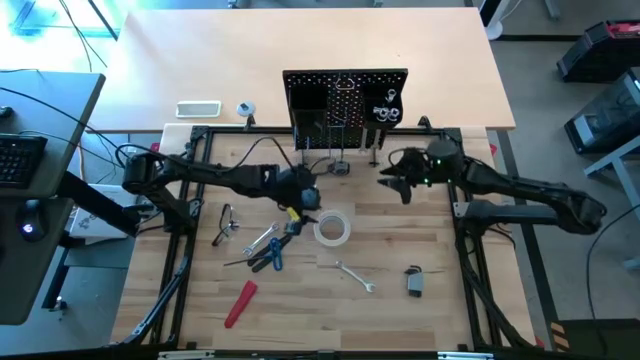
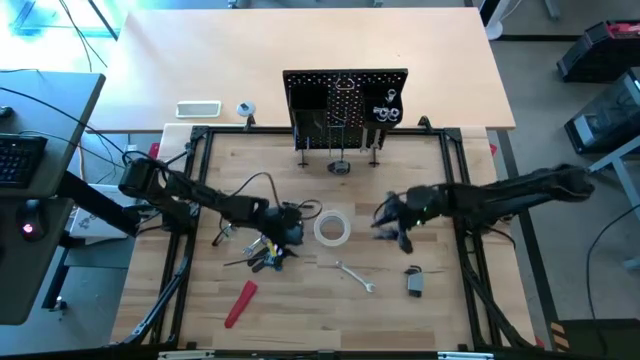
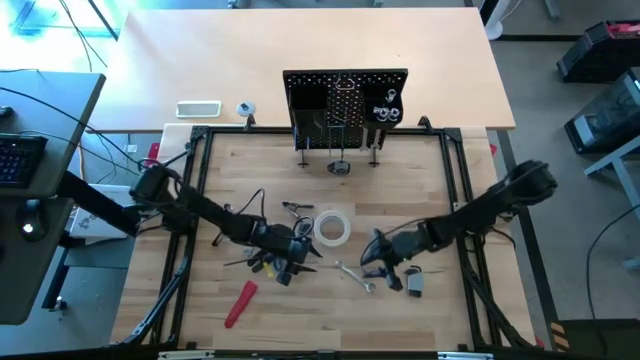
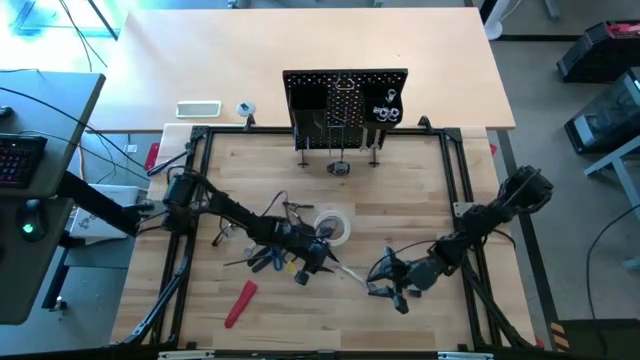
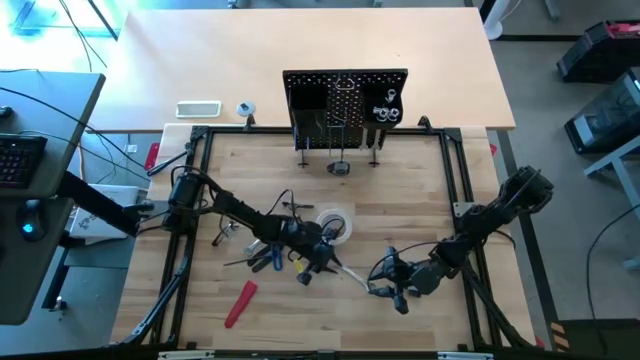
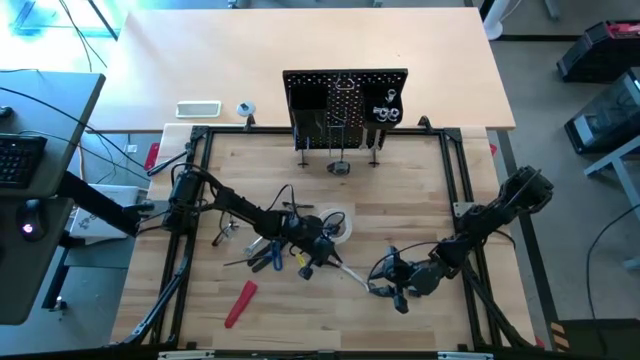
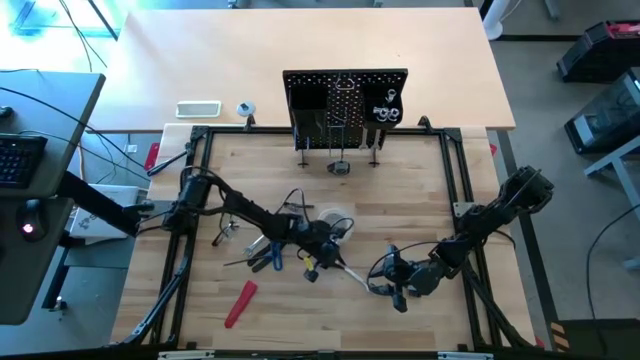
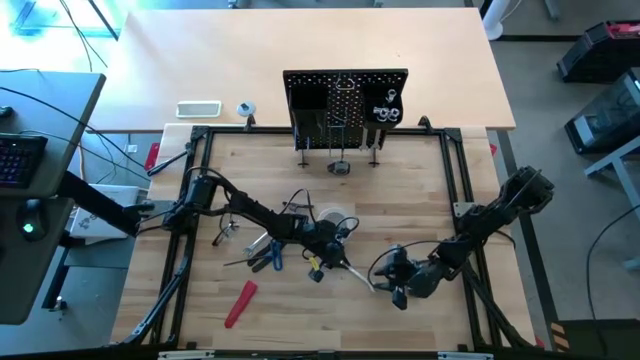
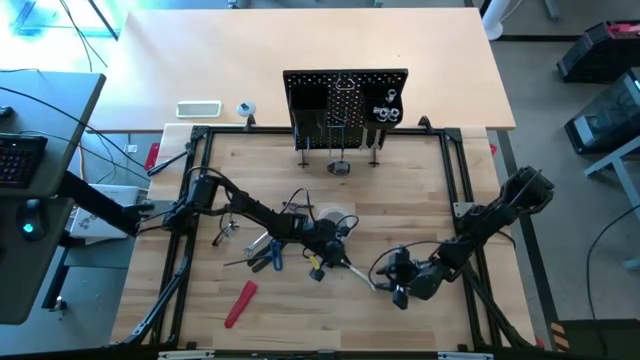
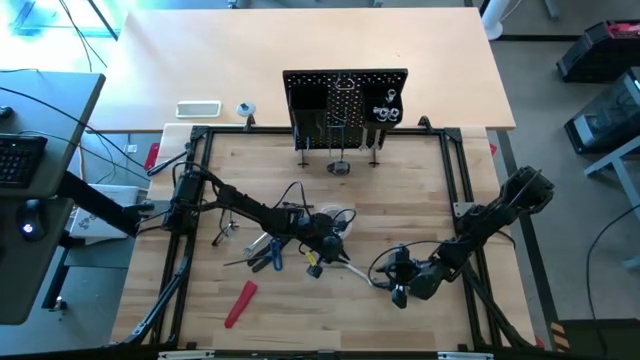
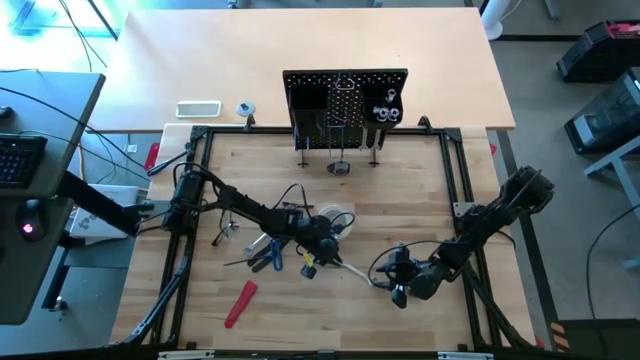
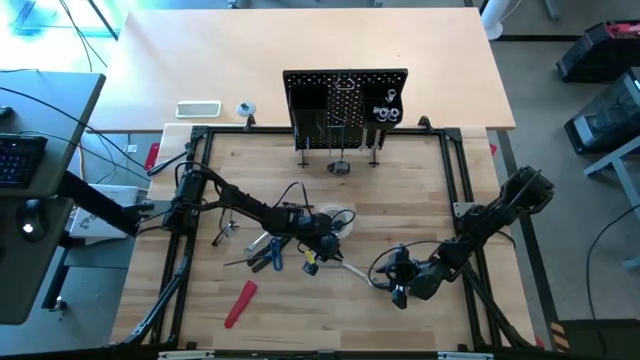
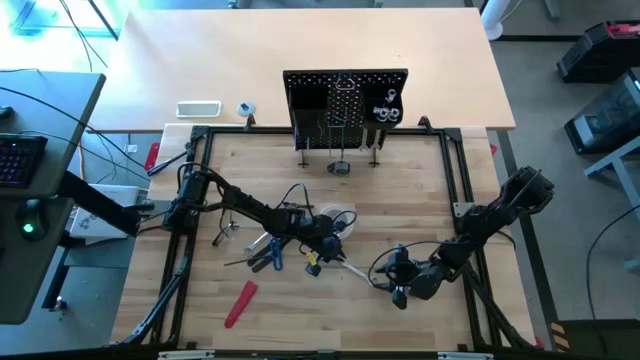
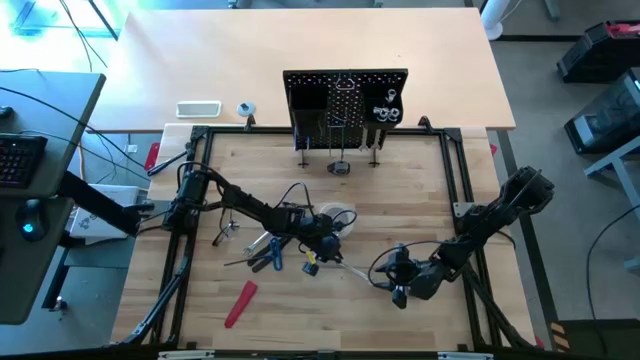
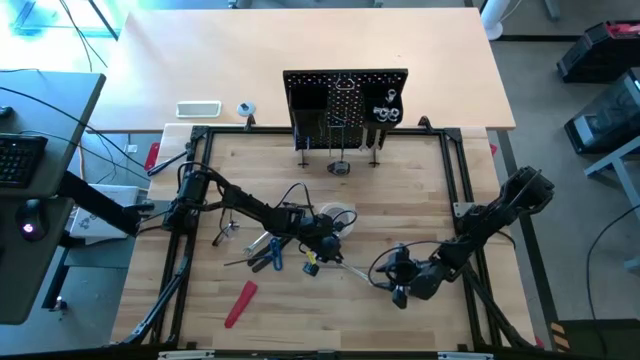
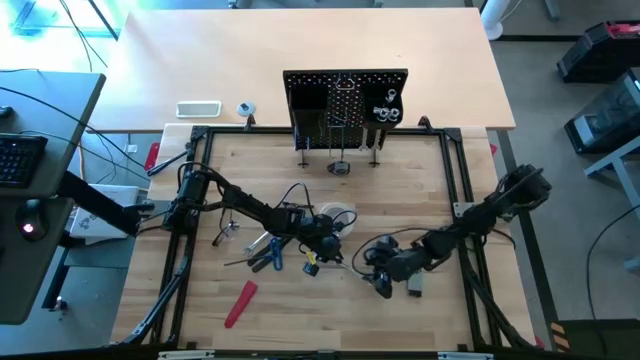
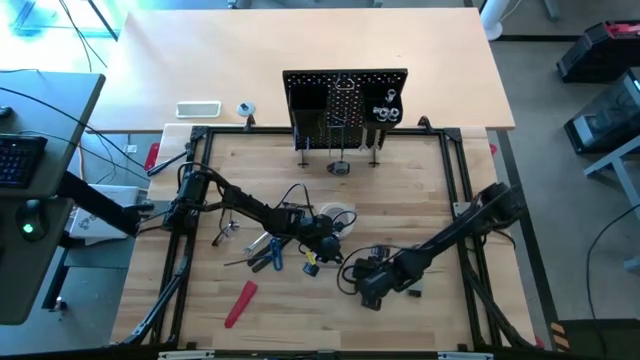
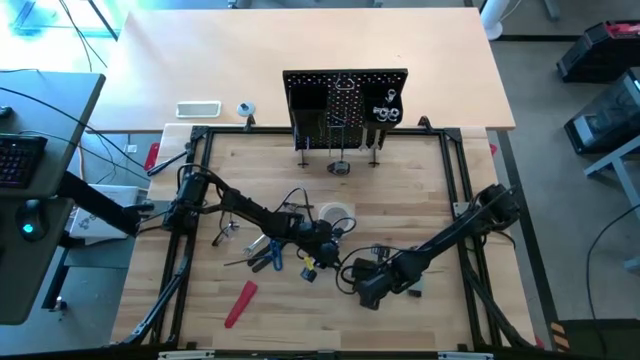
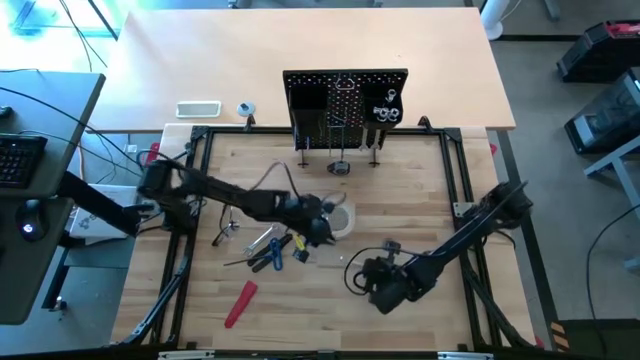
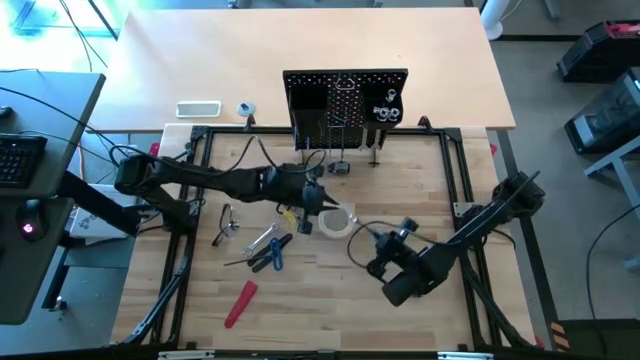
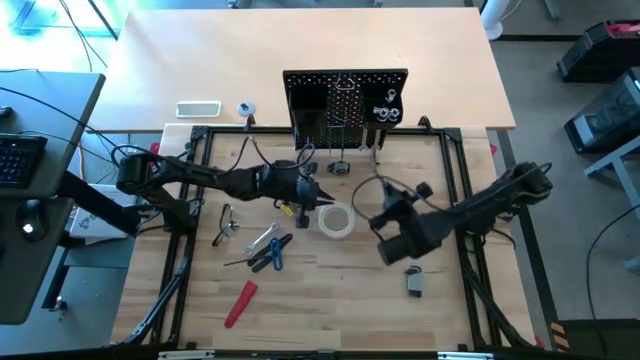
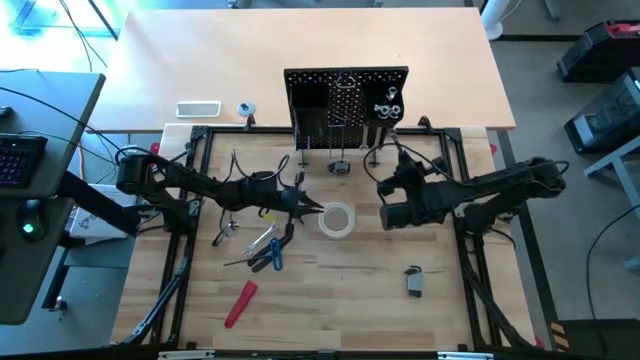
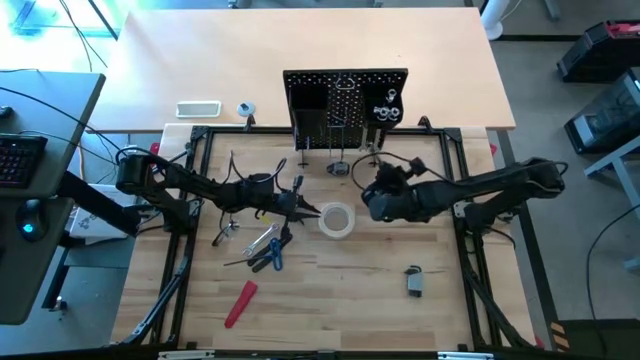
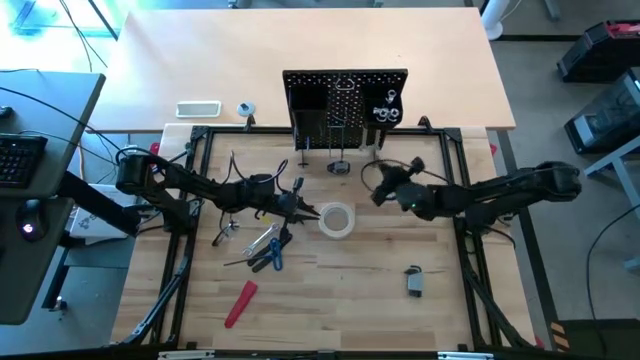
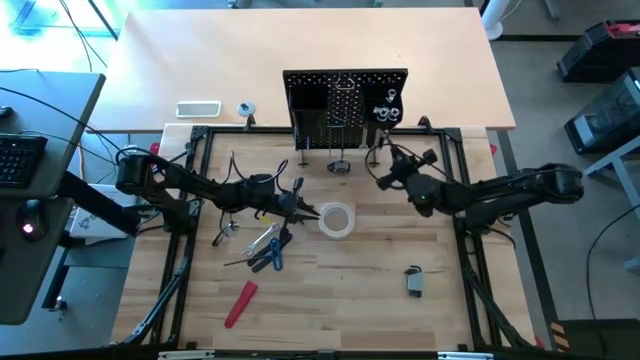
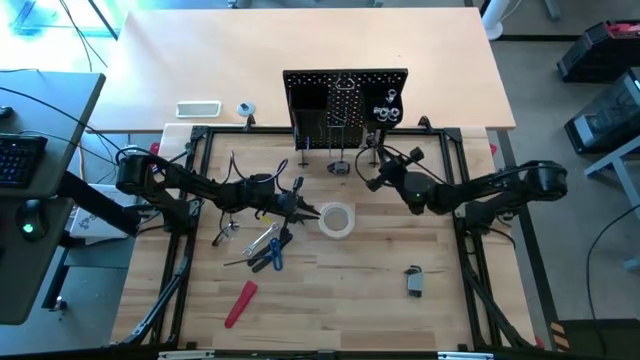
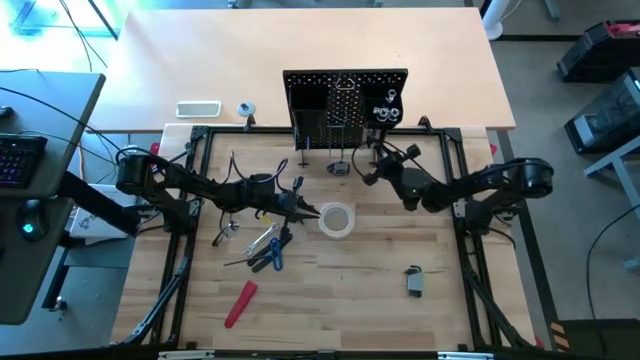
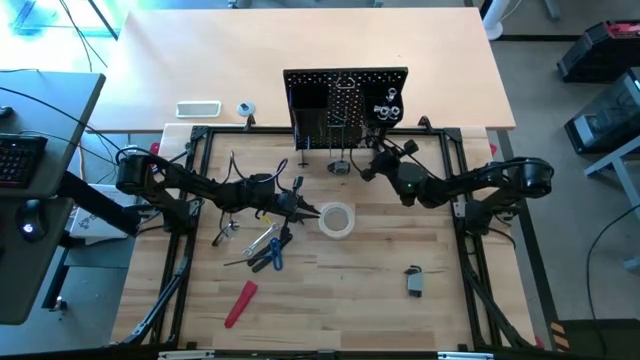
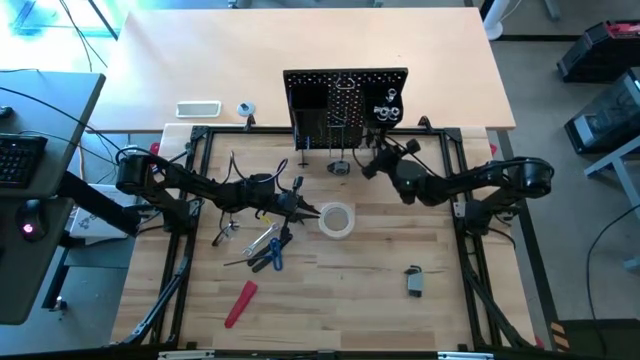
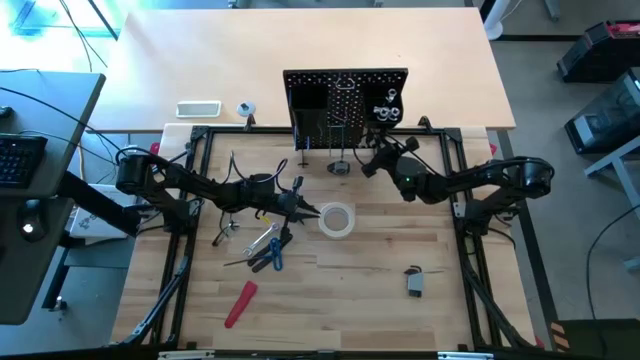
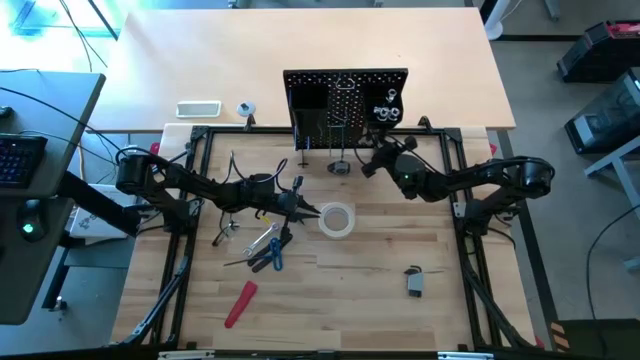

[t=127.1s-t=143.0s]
Task: Hang tools onto peg board
Hang the silver wrench on the peg board

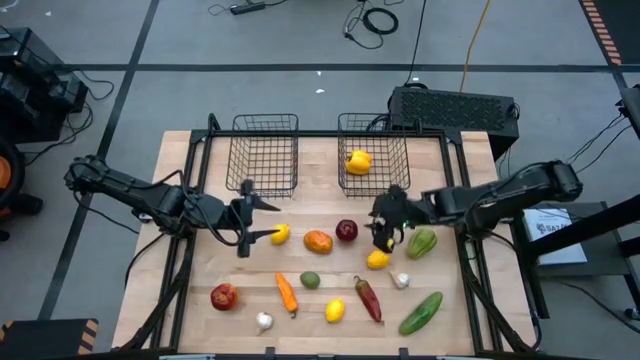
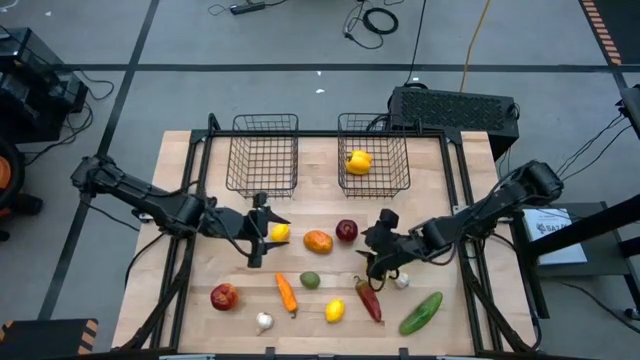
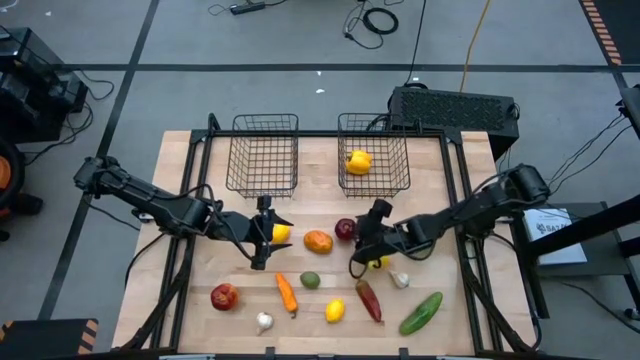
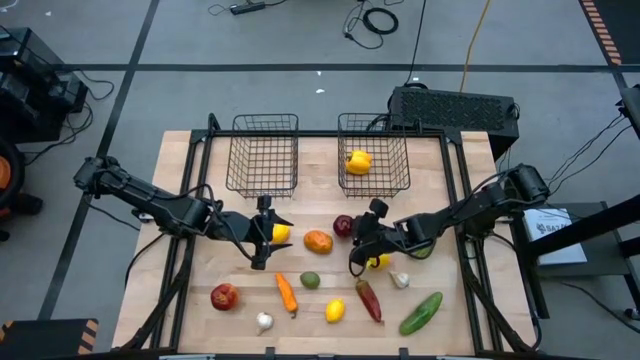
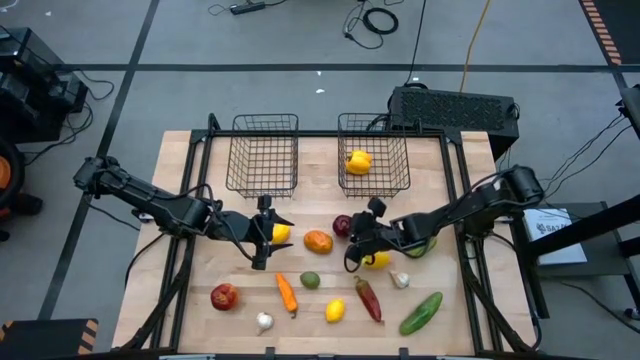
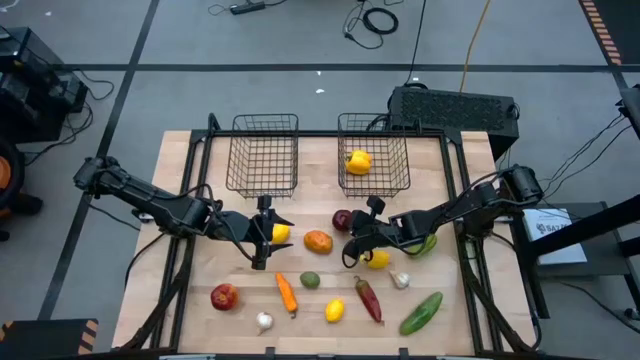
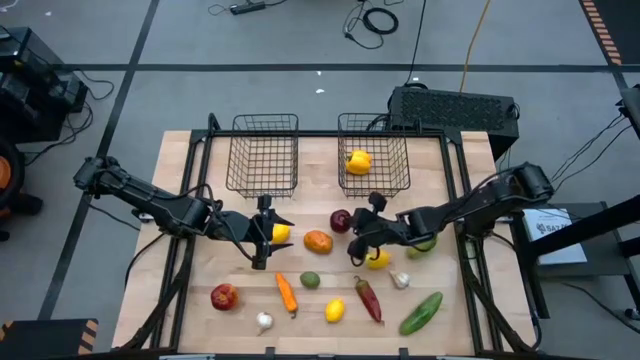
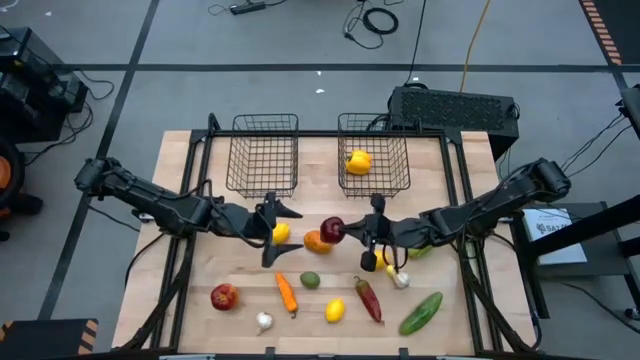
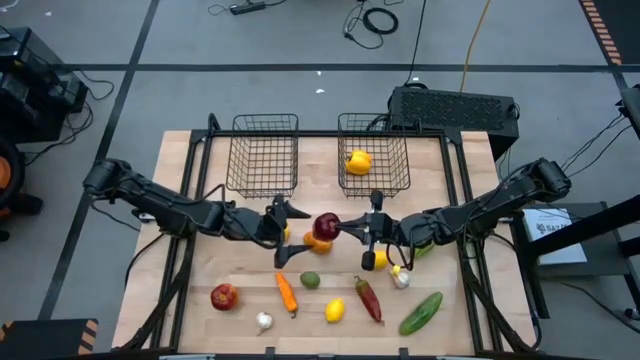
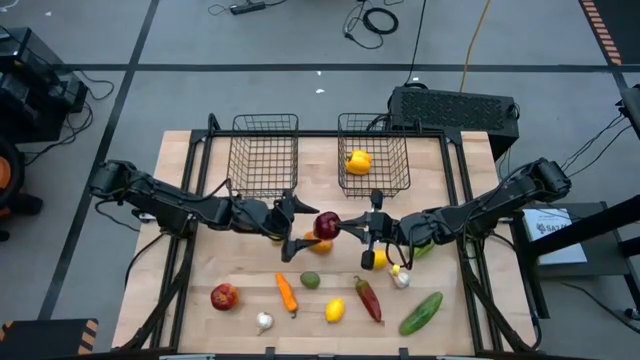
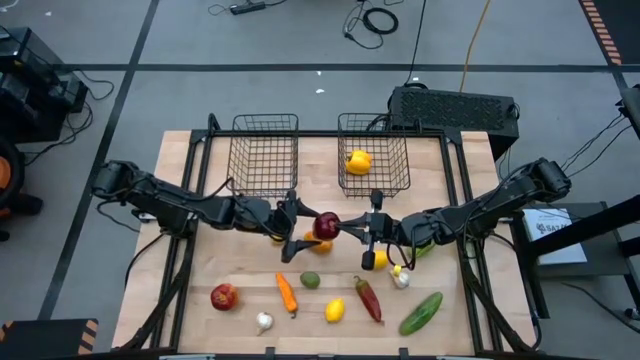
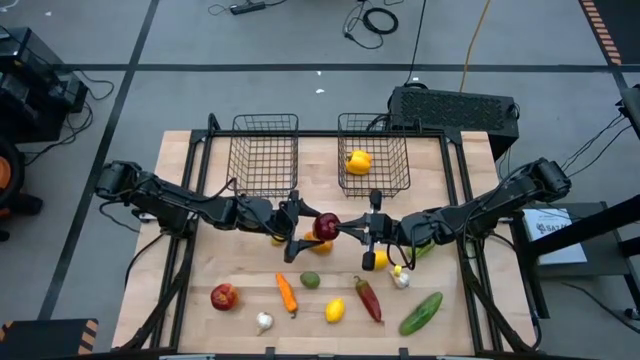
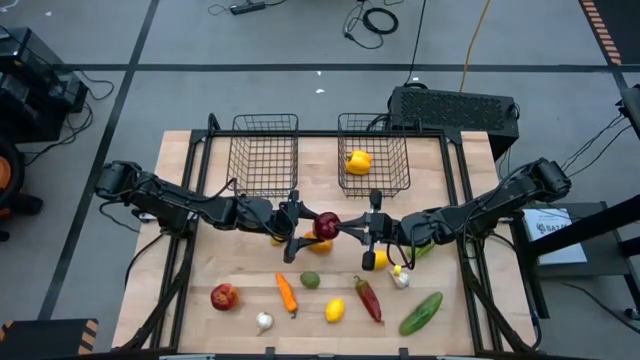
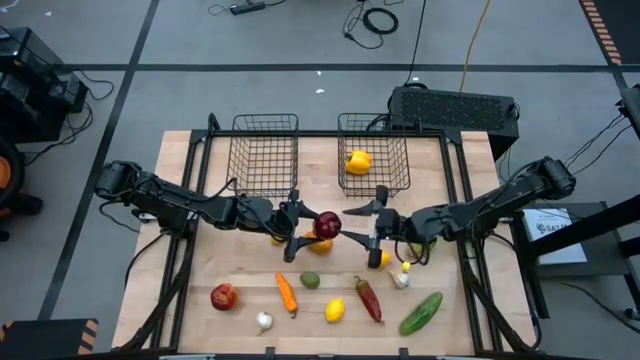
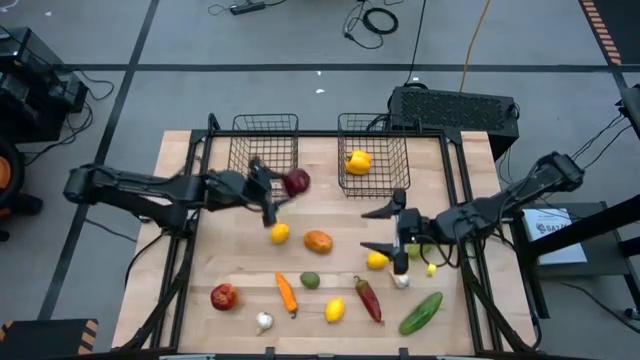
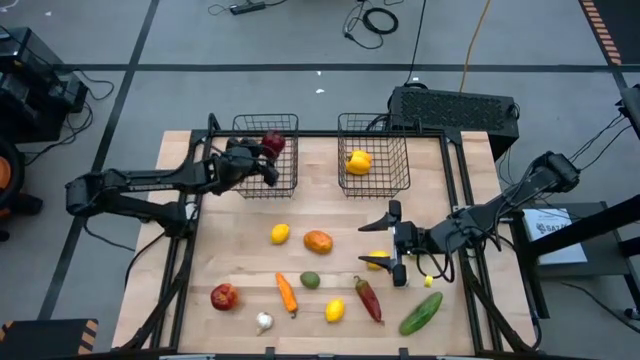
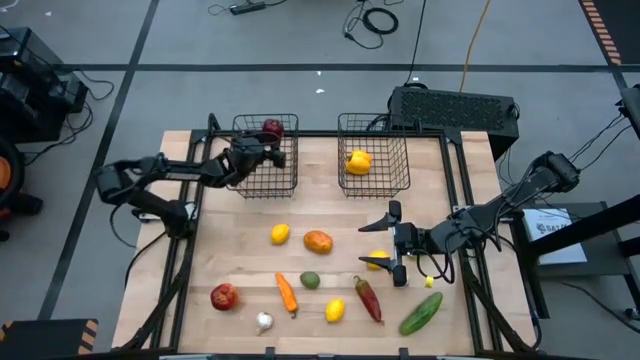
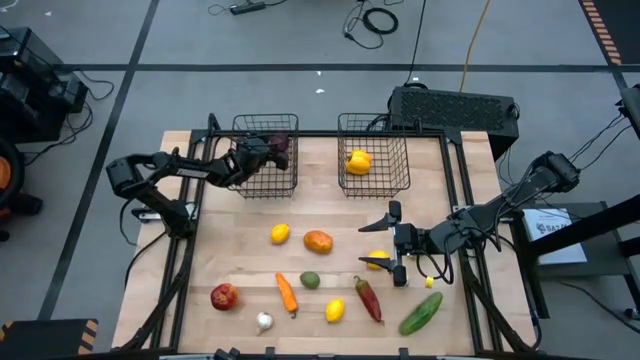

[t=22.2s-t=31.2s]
Task: Sort produce into baskets
Put the top red apple into the left mesh basket
